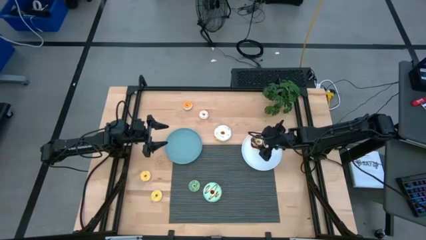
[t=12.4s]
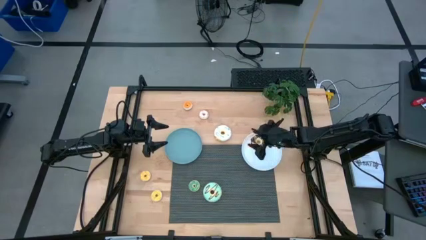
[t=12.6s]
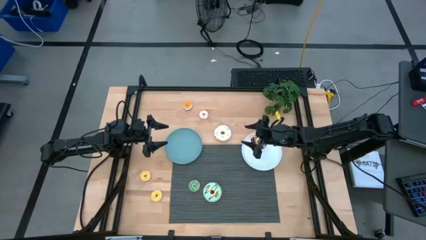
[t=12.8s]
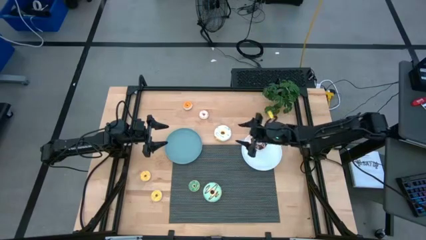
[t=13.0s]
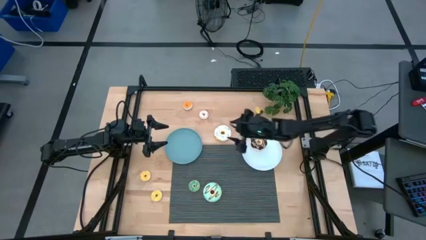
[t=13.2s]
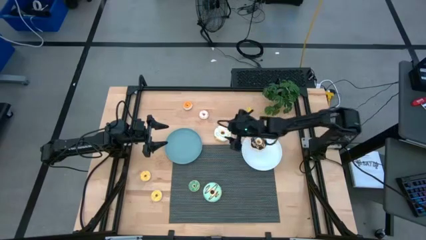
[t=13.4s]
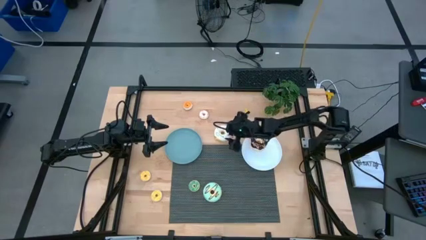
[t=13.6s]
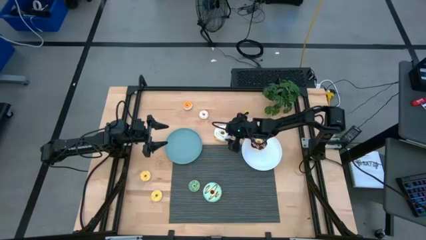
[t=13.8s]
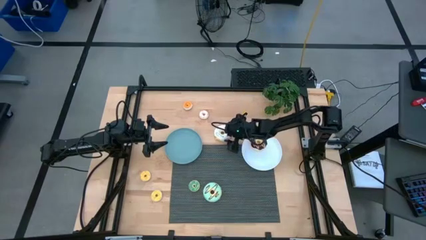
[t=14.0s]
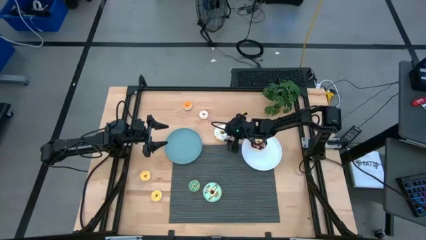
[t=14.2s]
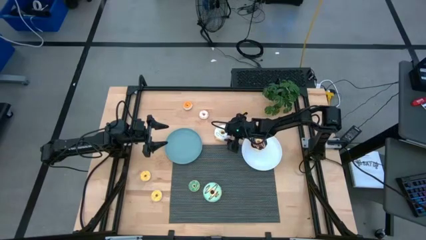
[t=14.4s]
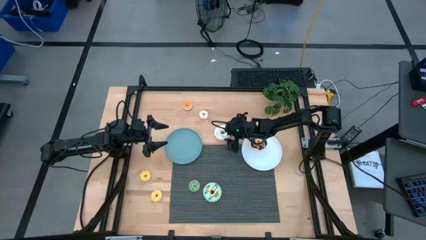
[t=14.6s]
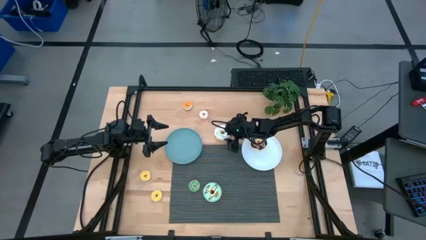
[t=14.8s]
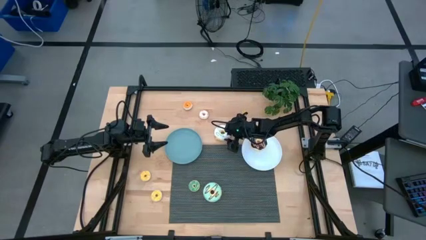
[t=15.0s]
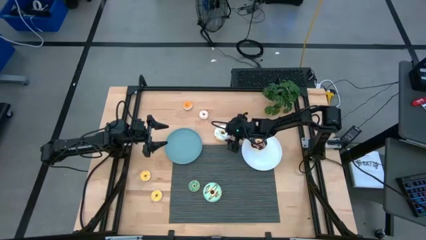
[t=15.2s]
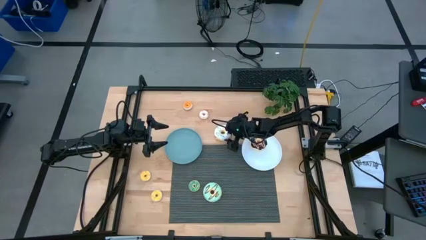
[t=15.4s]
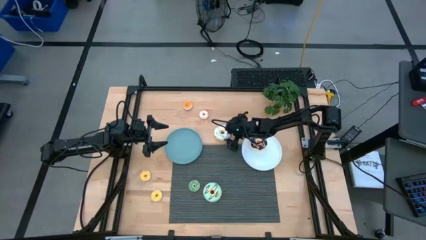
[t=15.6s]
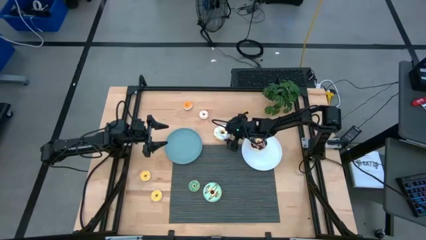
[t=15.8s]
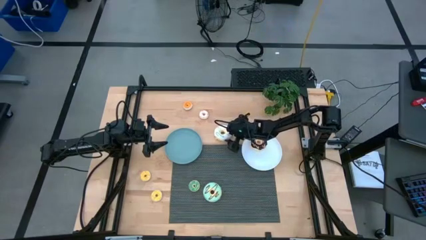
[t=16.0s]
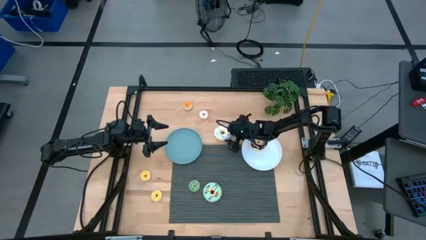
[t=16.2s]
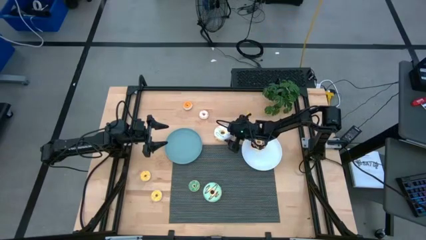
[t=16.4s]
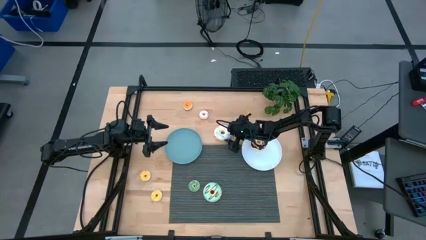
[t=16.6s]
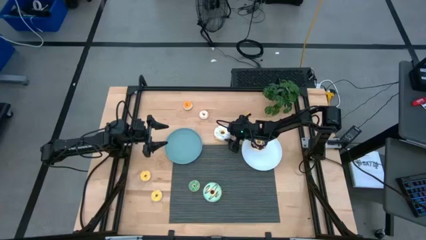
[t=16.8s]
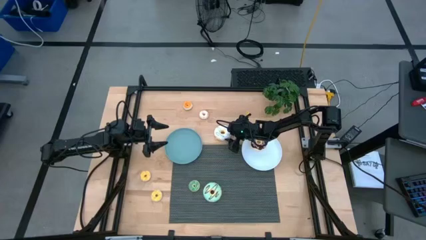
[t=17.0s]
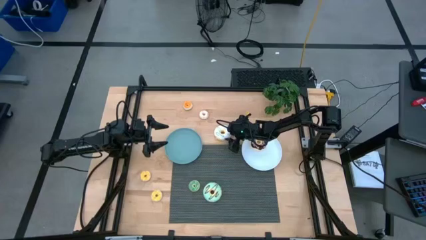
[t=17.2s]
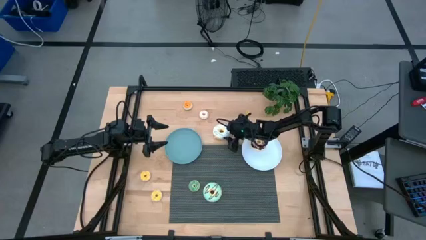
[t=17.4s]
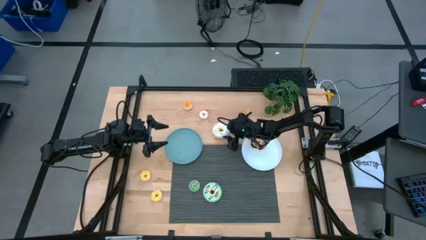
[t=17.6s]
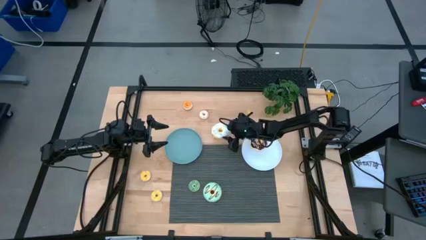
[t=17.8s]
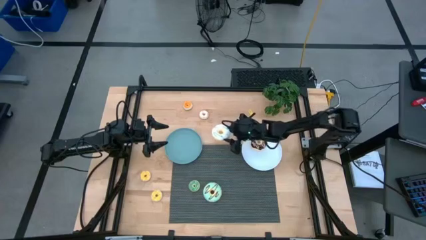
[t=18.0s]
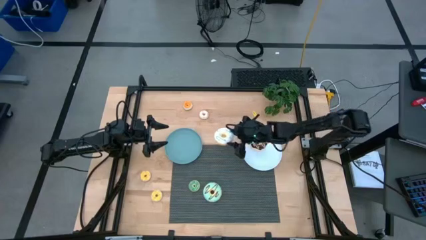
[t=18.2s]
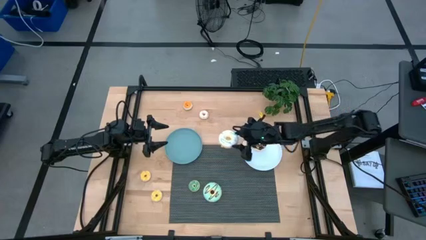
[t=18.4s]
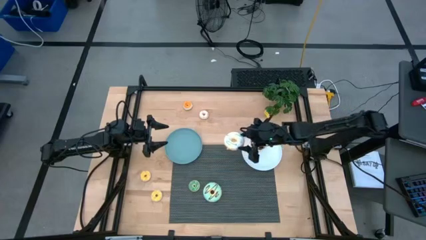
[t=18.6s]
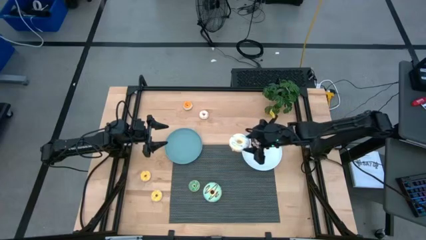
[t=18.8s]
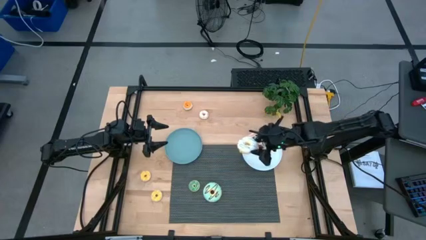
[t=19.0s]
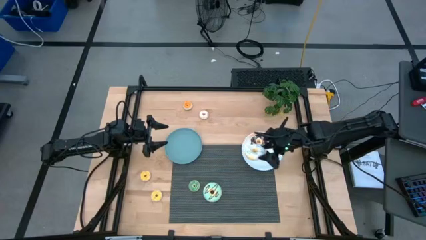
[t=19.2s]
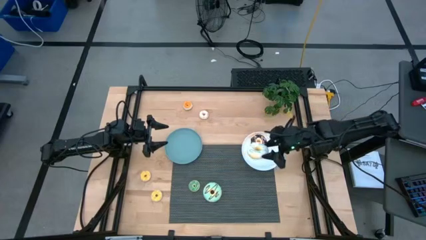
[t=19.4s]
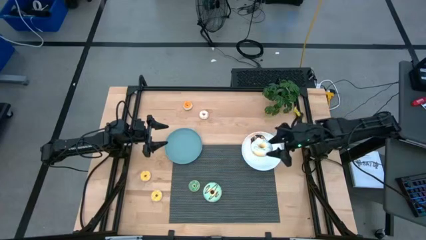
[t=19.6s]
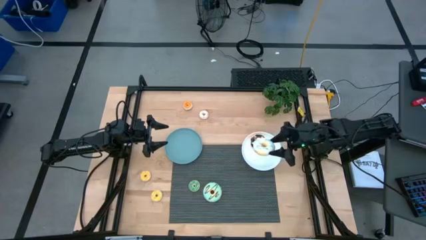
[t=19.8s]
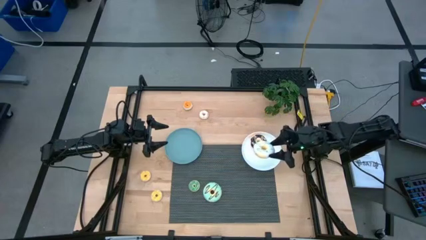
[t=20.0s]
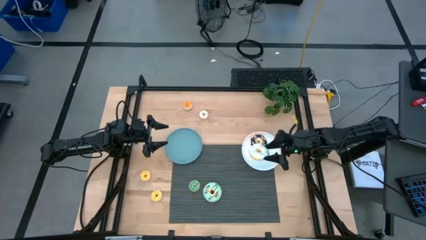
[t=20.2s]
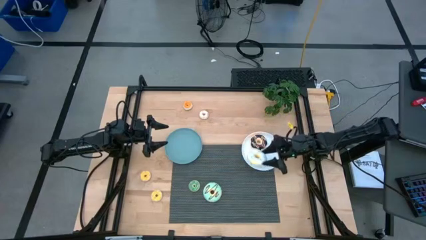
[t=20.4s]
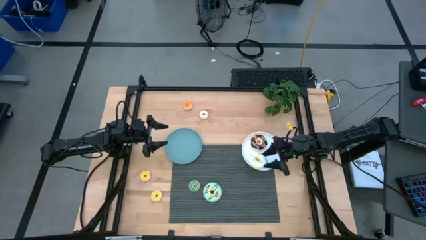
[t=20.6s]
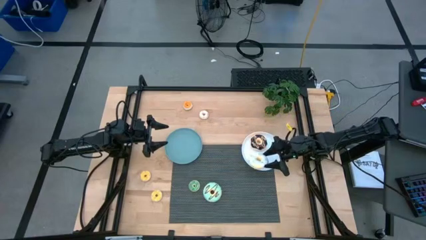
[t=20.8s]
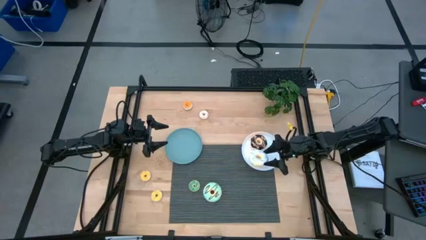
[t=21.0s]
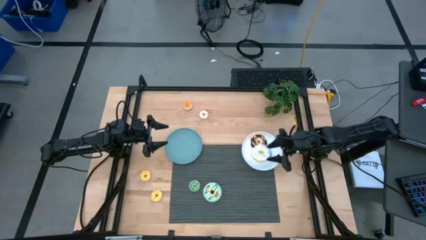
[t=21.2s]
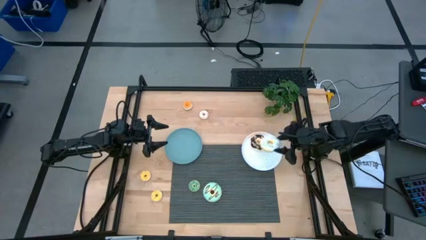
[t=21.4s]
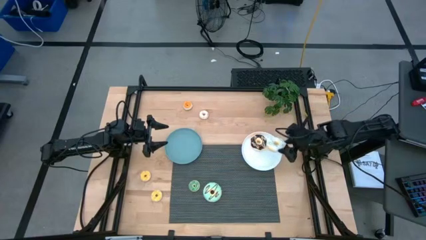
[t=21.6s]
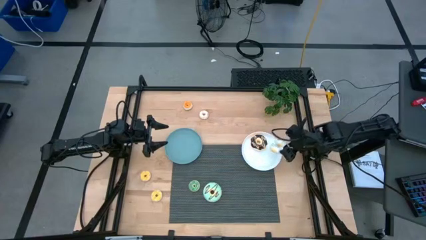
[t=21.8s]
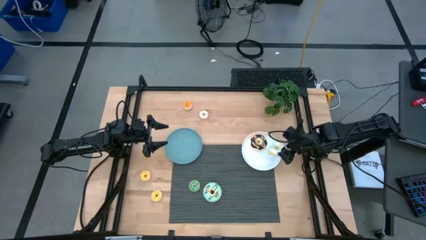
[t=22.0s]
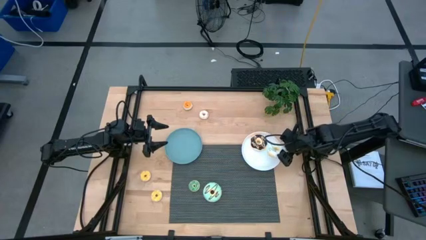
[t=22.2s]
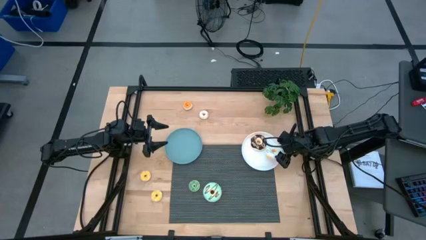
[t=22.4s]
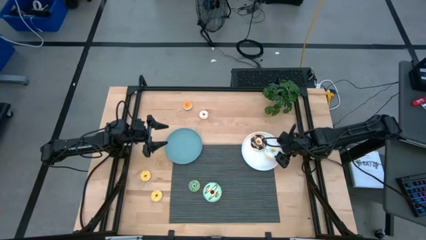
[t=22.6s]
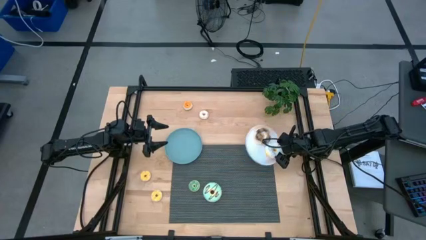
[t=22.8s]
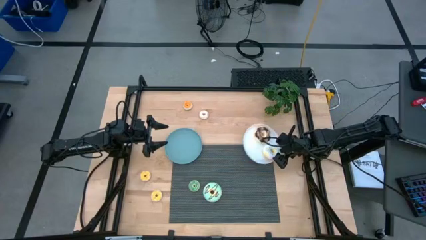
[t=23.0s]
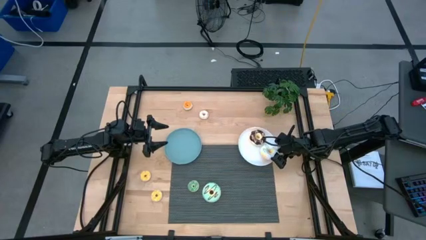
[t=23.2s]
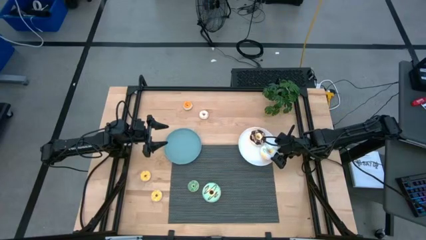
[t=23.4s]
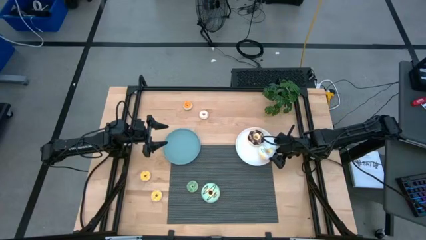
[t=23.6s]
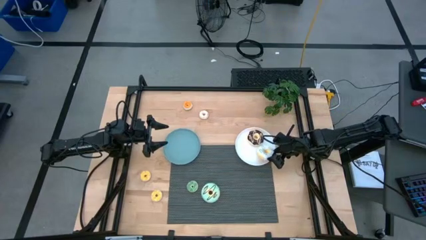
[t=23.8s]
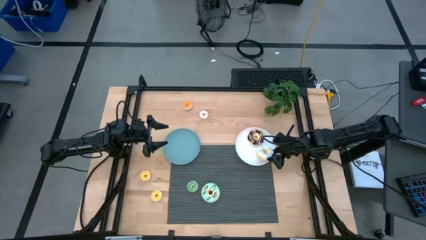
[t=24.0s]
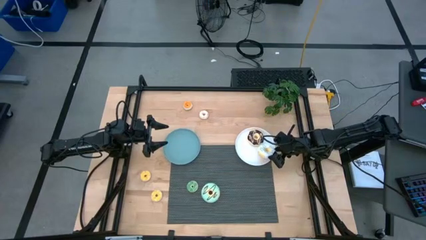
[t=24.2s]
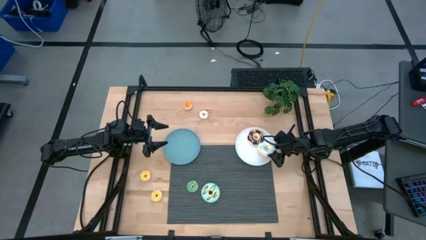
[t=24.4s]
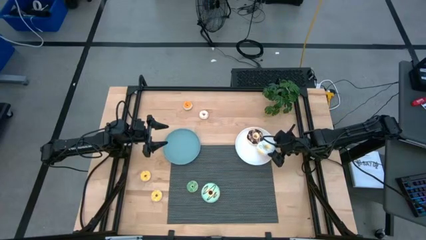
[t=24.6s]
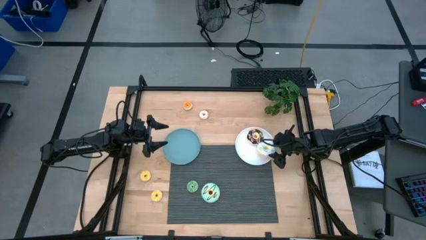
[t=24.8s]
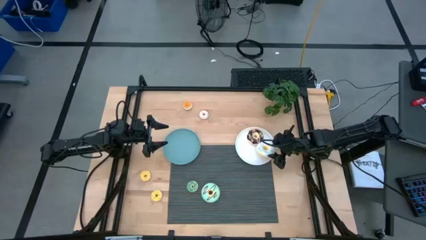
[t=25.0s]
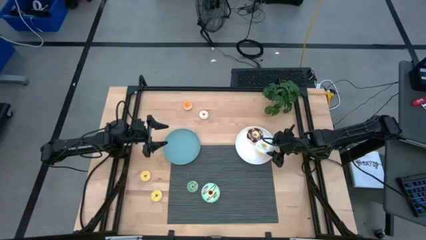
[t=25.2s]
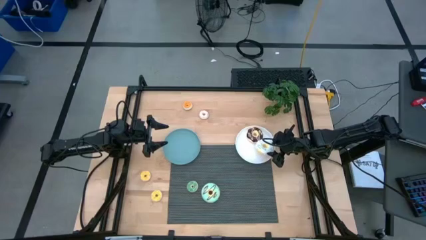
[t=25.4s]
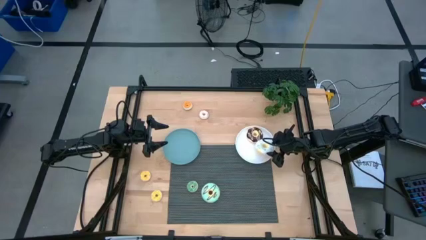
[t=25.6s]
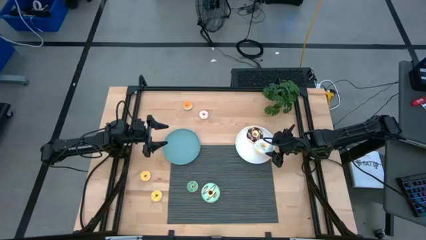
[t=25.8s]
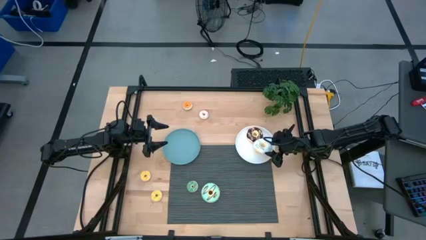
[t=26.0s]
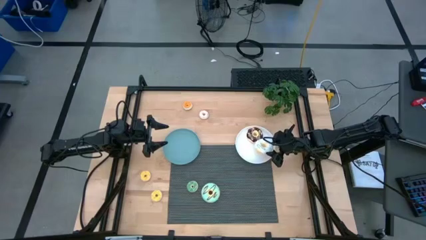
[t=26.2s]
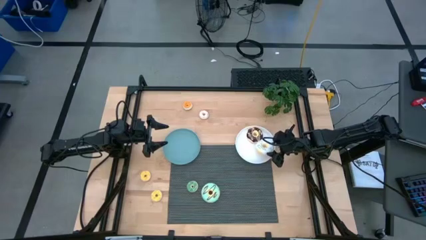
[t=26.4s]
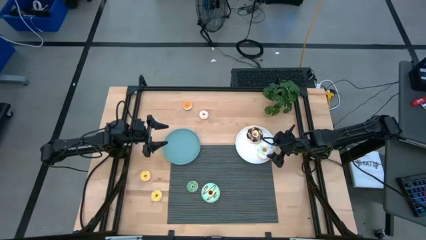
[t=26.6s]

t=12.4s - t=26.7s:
Task: Pick & Place donuts
Put the large white donut on the white plate
